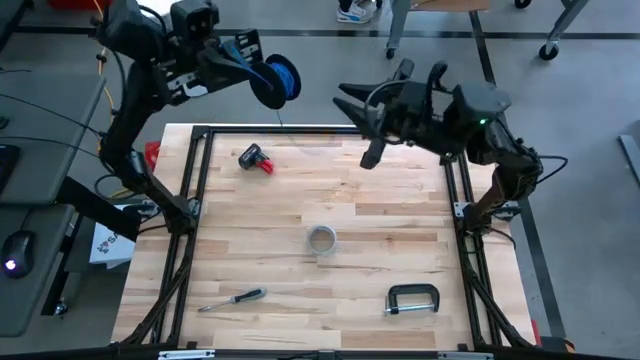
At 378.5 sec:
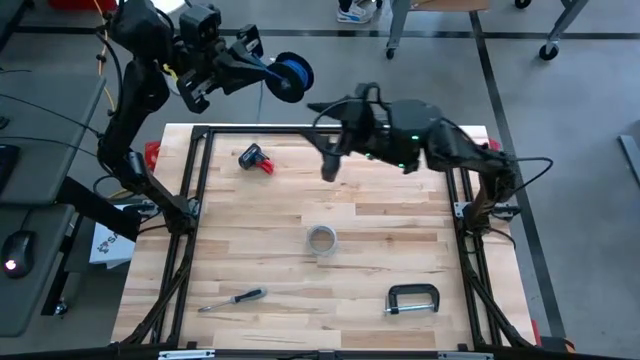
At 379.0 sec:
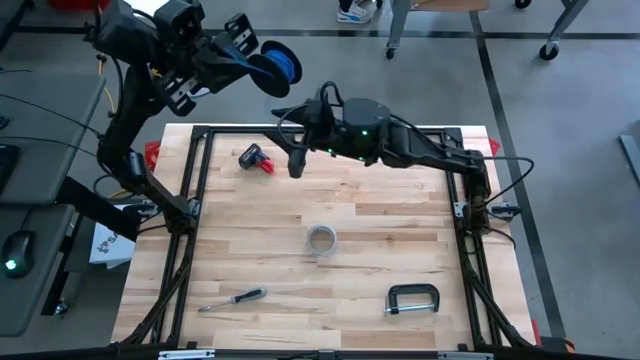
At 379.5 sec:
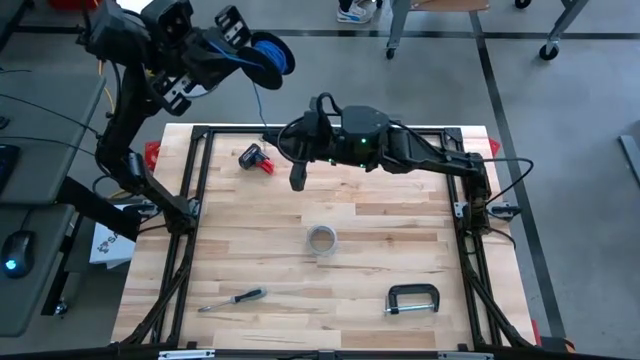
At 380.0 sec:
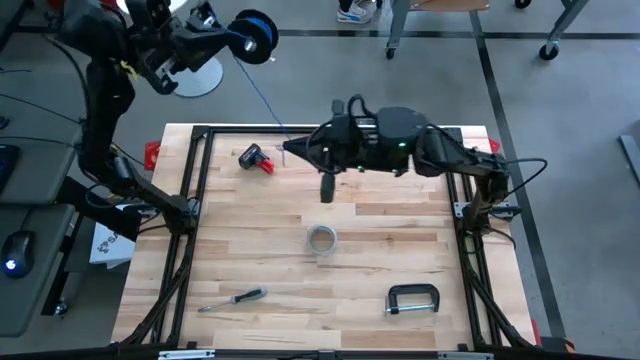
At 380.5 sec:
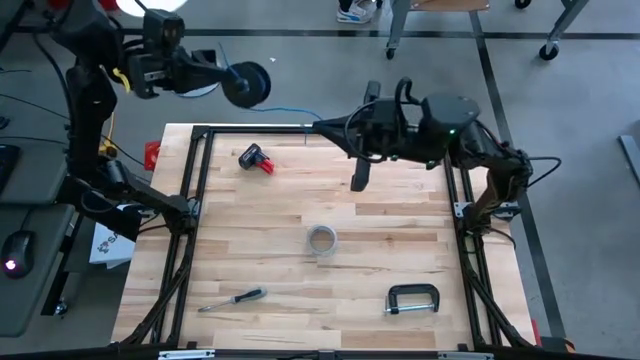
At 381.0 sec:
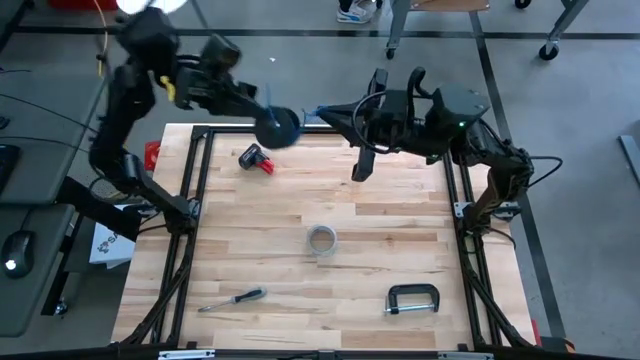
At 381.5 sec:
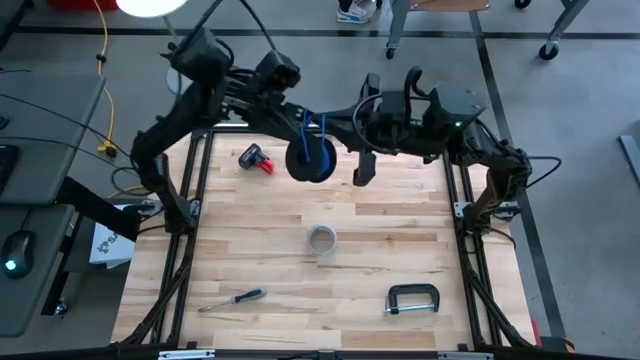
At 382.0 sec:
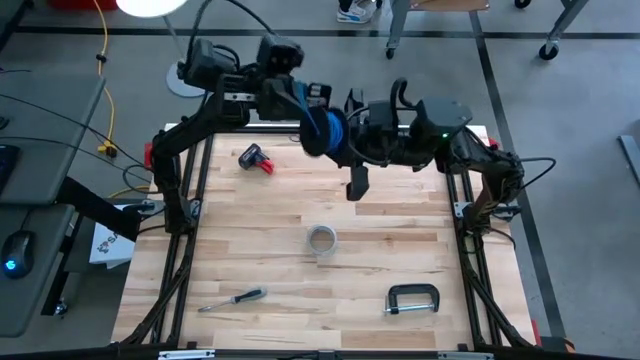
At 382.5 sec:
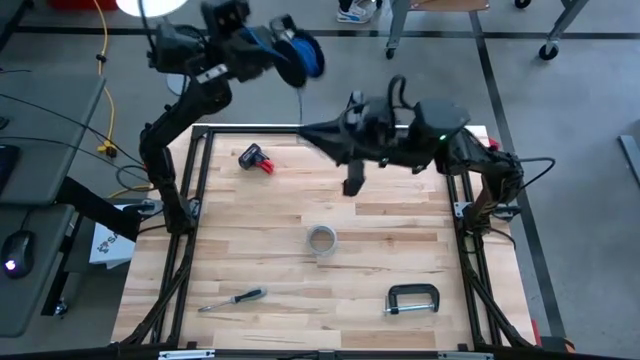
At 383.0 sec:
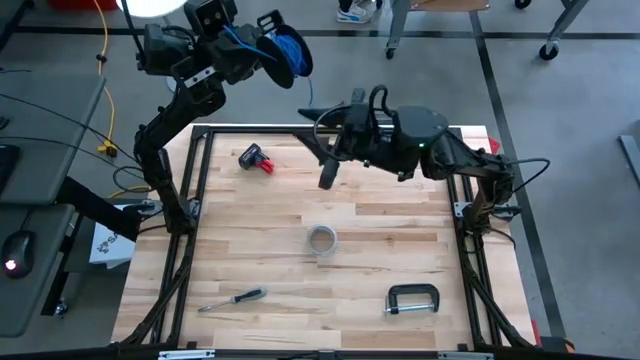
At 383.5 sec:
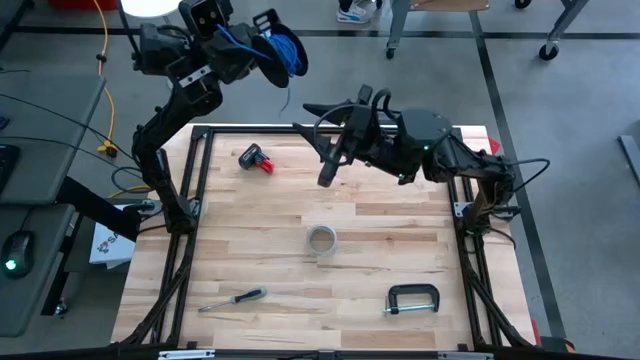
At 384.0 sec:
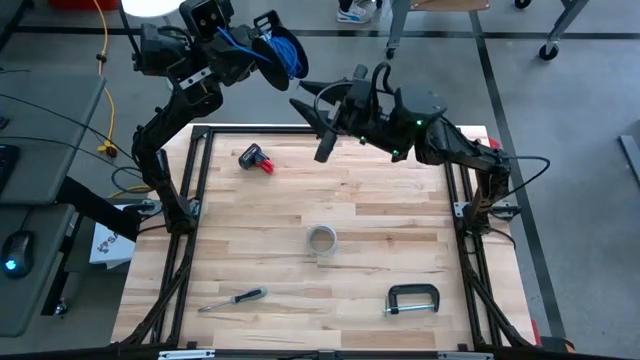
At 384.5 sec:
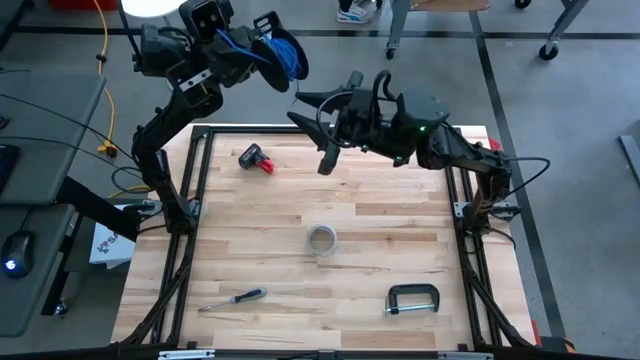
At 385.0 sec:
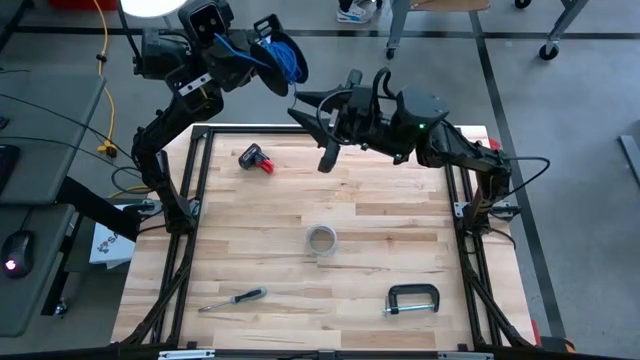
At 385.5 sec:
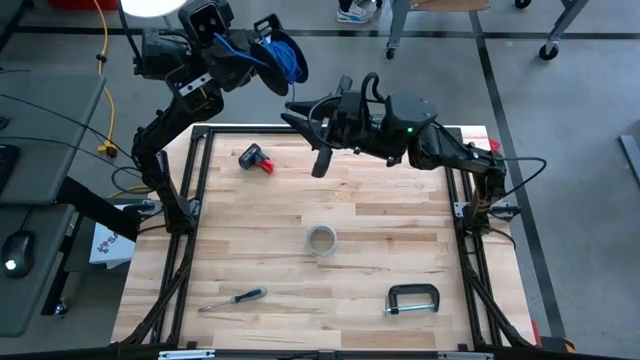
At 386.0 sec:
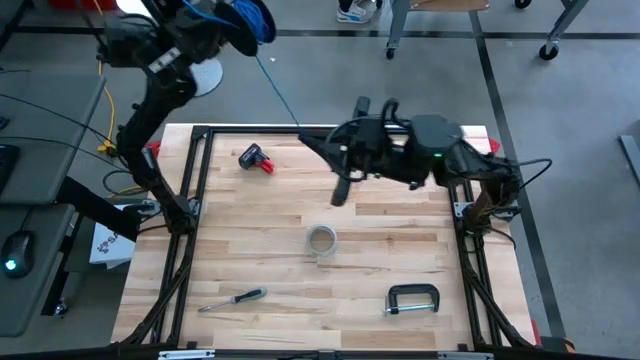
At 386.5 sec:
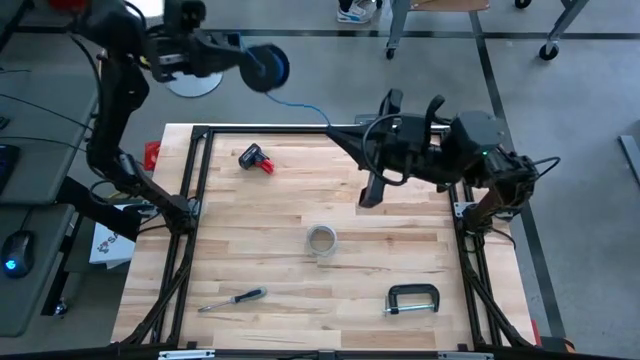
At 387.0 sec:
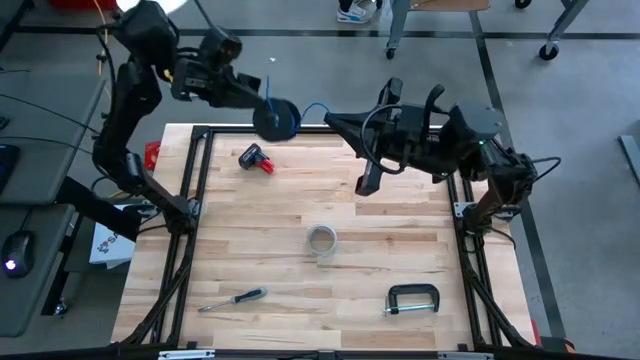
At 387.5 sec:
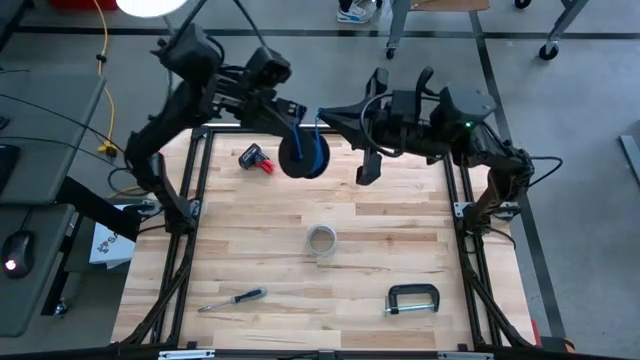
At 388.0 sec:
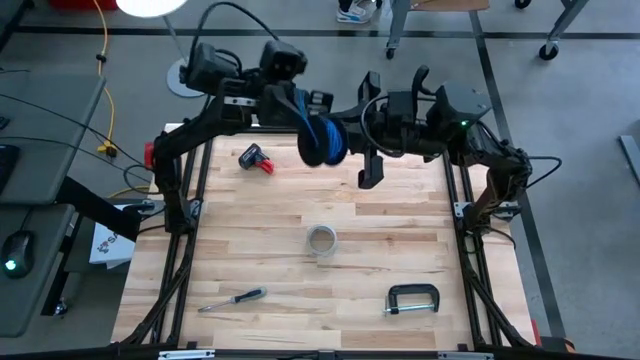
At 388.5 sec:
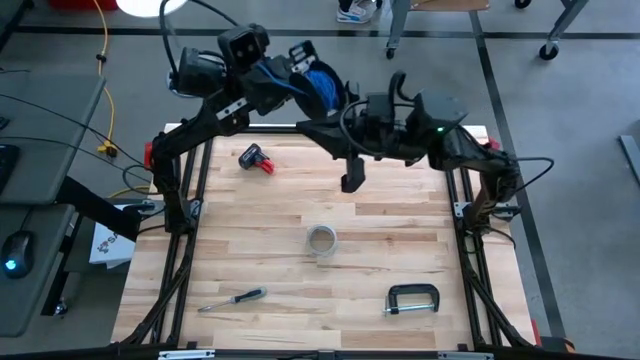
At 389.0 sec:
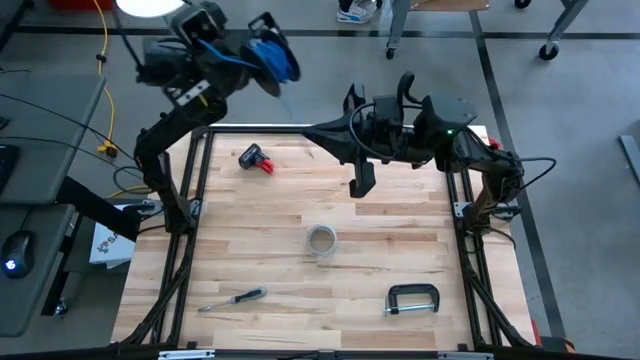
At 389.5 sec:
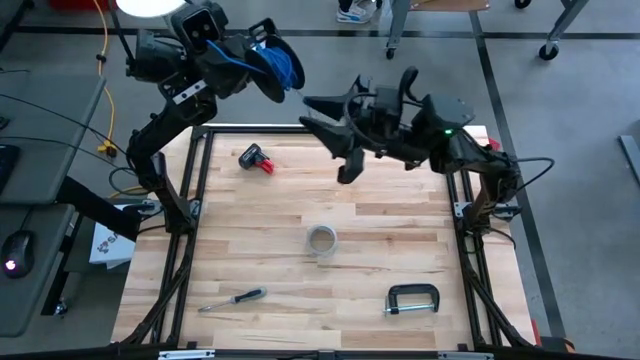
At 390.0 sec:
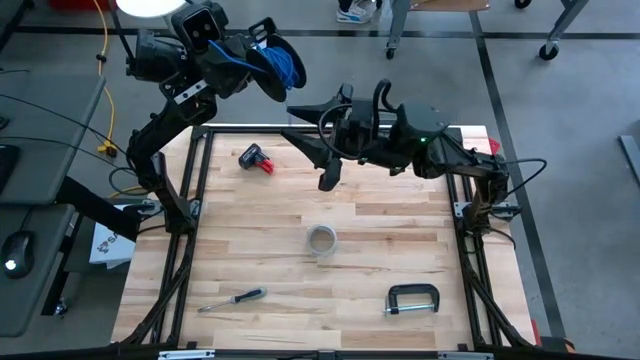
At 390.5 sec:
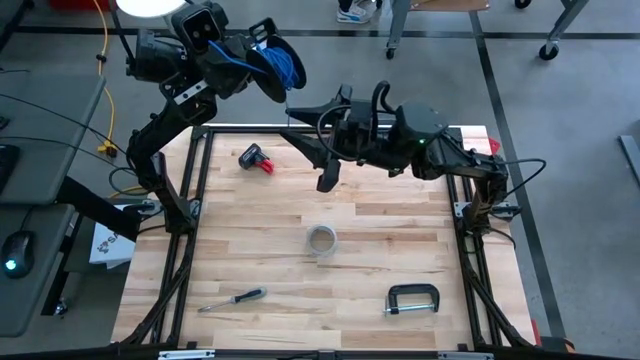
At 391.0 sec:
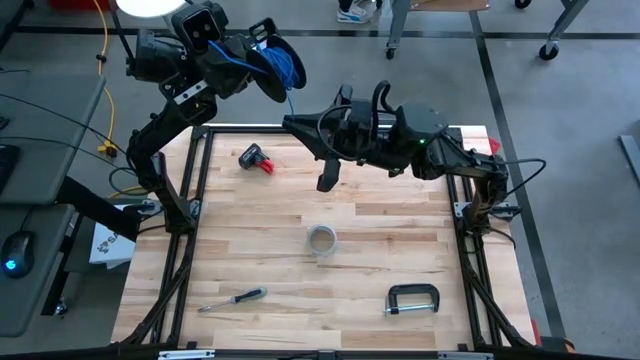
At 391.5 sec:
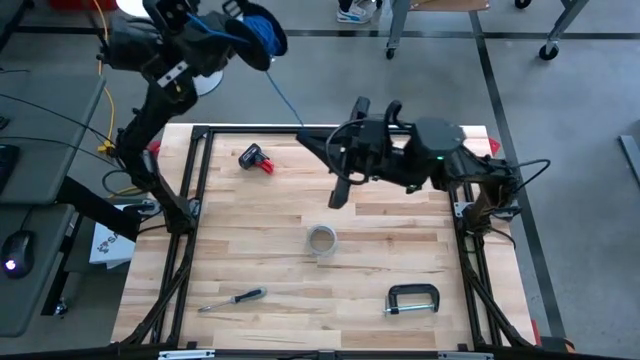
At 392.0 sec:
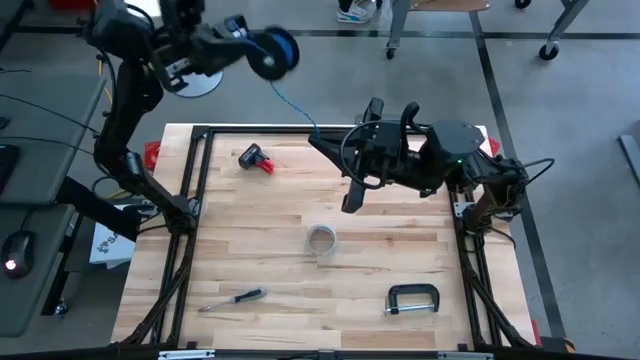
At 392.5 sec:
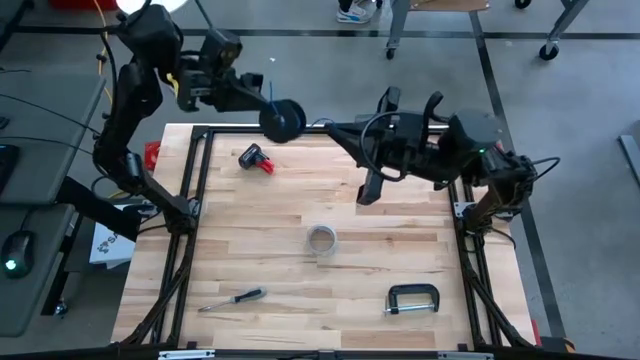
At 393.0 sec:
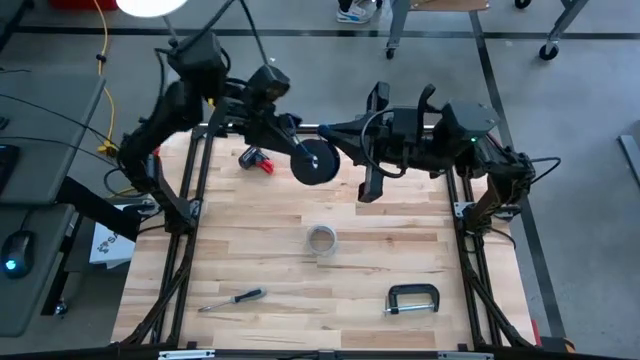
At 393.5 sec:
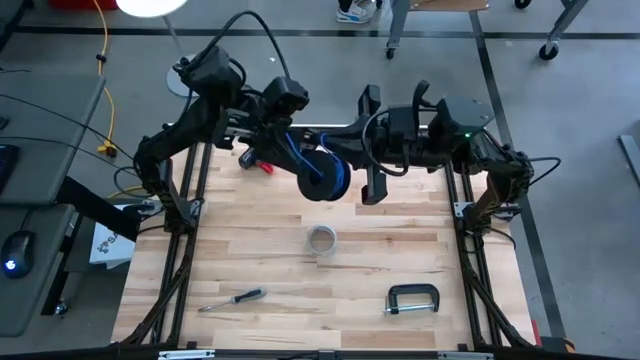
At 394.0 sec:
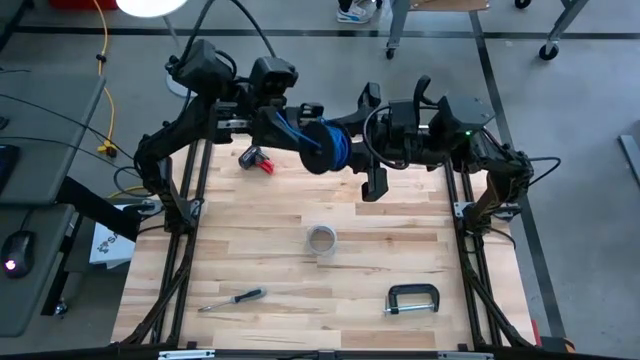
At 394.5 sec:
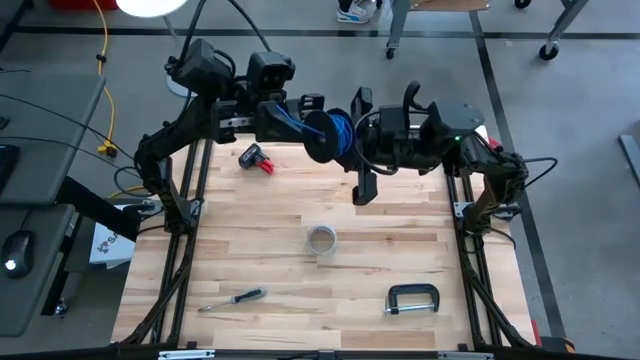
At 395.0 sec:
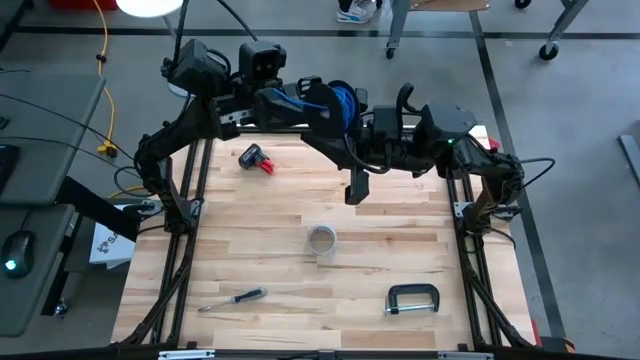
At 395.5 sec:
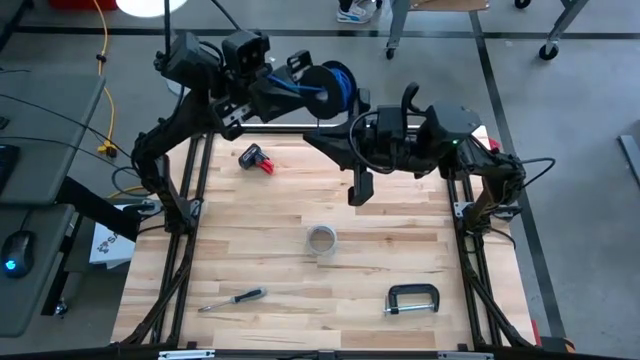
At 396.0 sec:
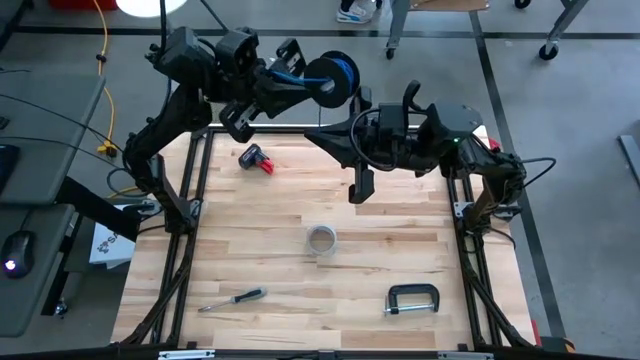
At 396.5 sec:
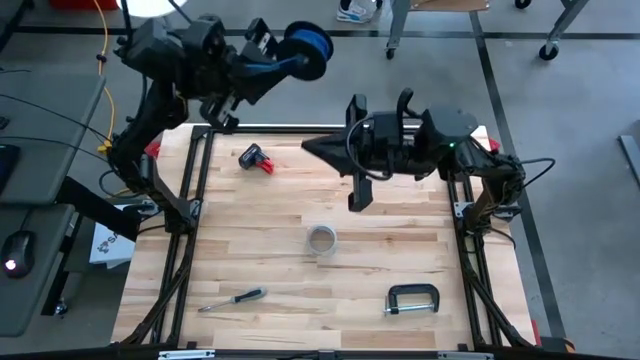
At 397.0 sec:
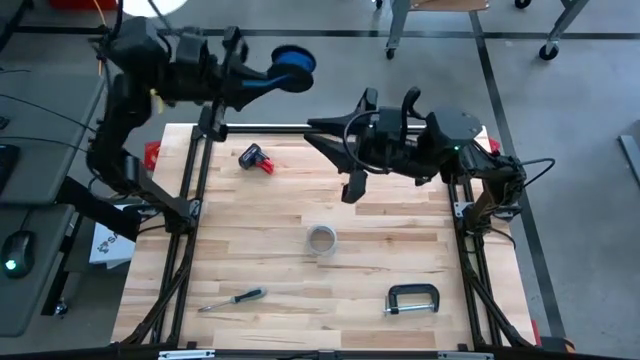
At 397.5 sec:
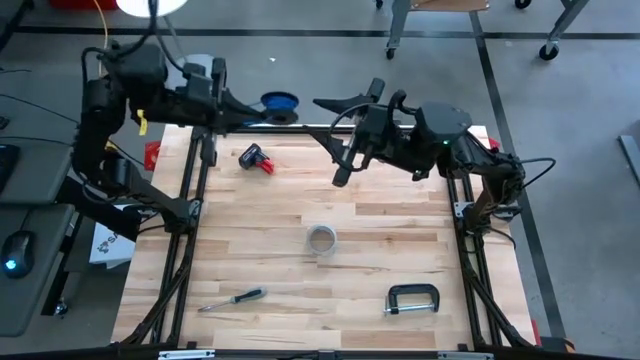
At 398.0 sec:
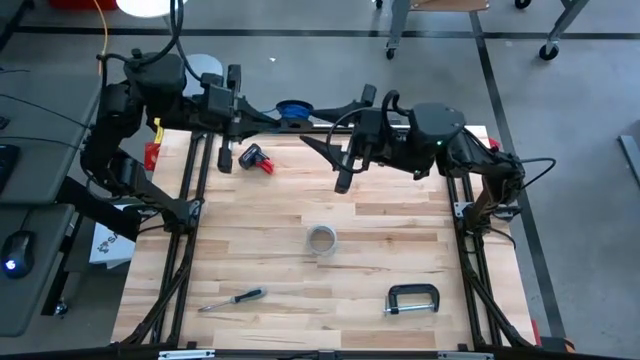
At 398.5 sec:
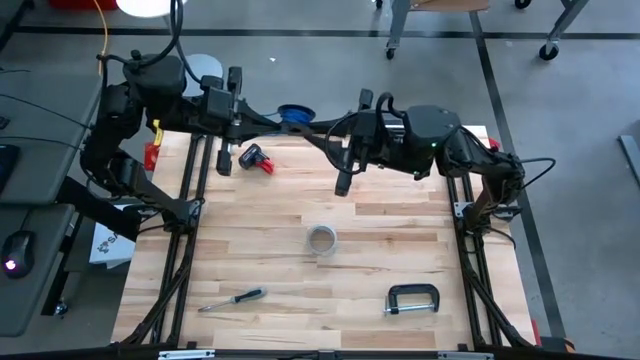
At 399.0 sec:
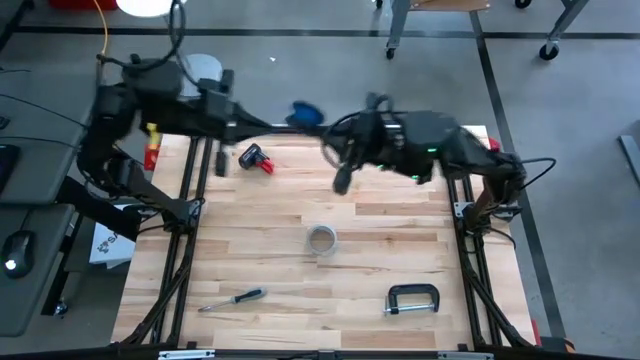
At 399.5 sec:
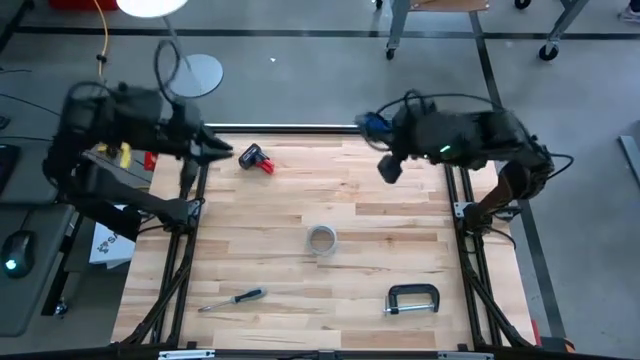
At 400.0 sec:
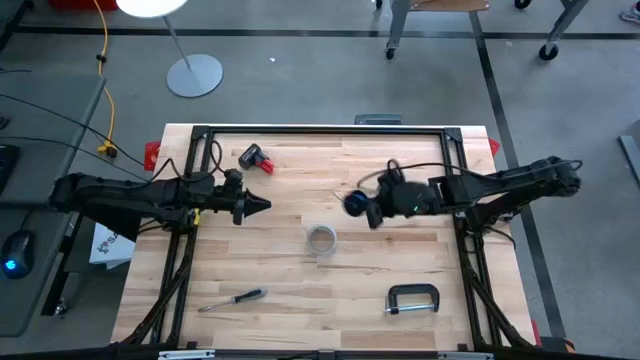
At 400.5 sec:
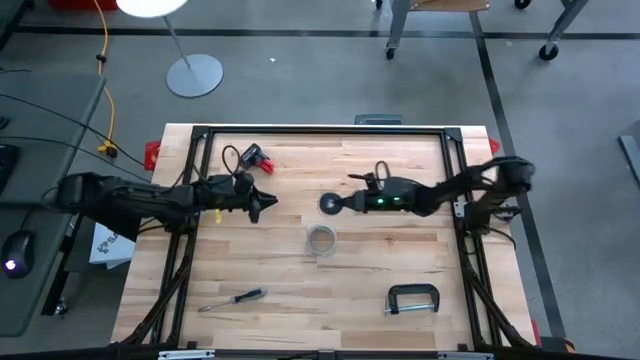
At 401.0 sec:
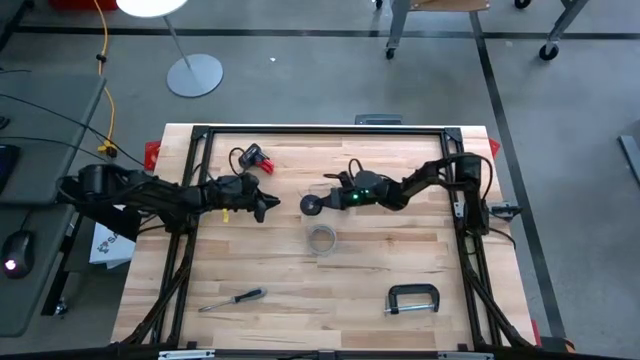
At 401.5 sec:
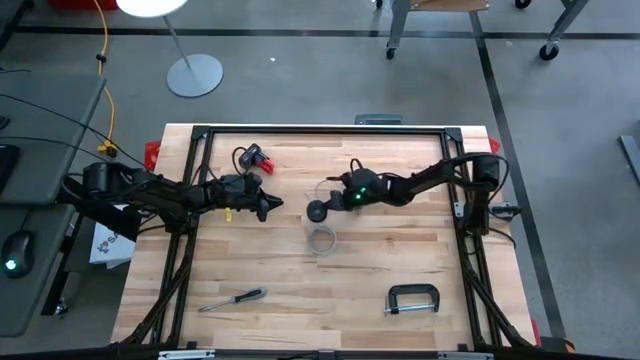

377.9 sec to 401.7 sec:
Task: Coil cords
Coil the blue wire on the spool
